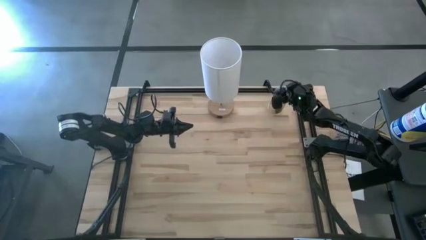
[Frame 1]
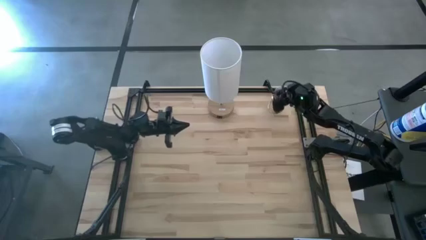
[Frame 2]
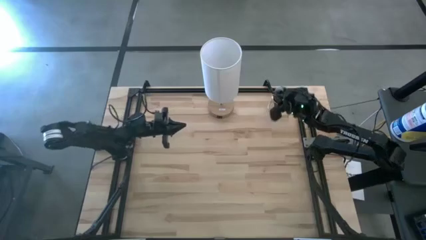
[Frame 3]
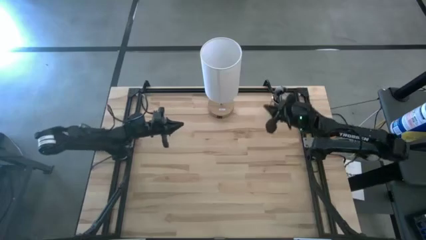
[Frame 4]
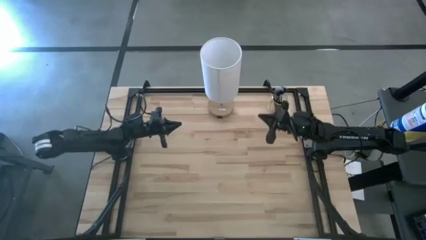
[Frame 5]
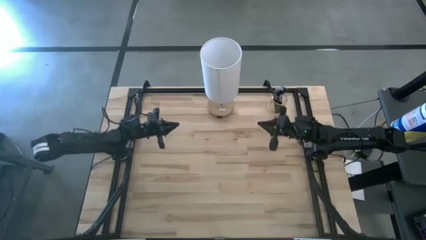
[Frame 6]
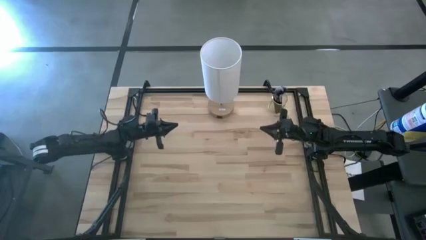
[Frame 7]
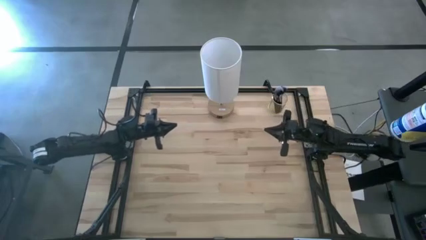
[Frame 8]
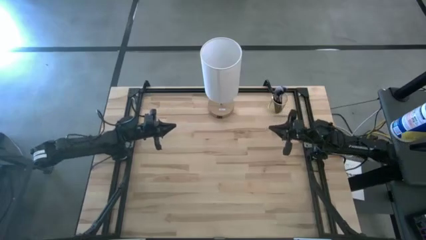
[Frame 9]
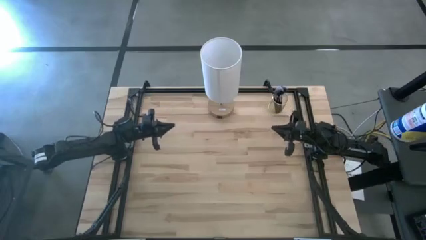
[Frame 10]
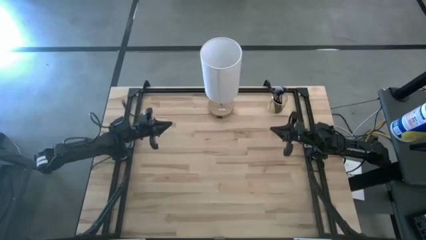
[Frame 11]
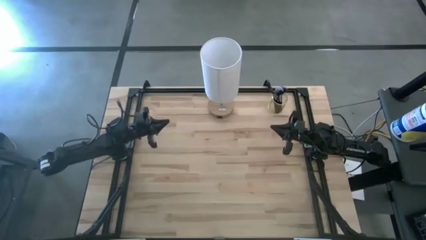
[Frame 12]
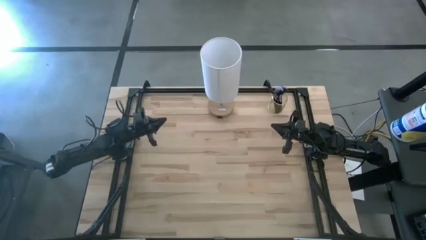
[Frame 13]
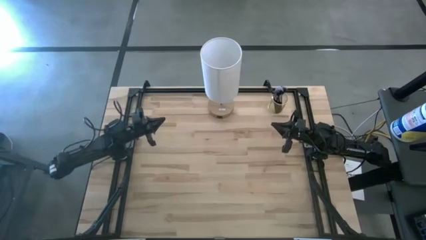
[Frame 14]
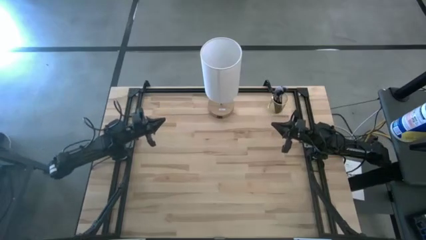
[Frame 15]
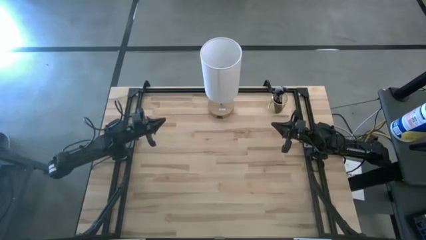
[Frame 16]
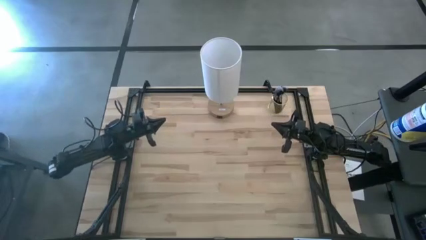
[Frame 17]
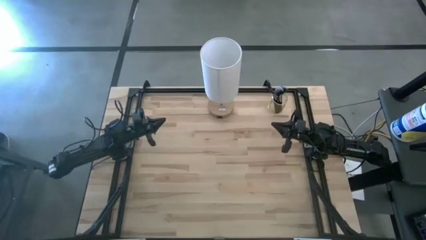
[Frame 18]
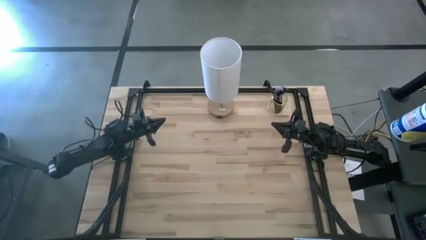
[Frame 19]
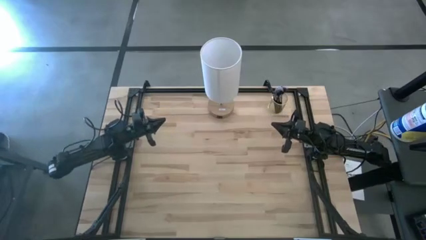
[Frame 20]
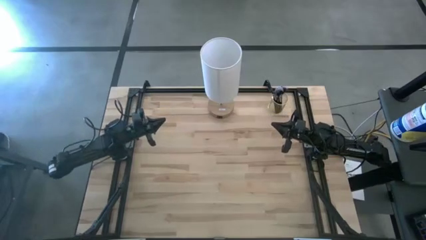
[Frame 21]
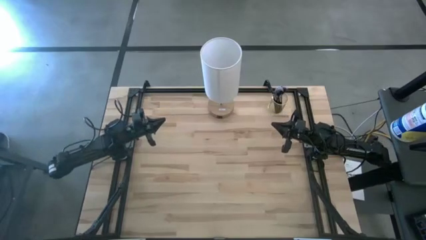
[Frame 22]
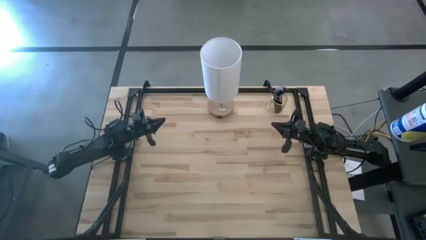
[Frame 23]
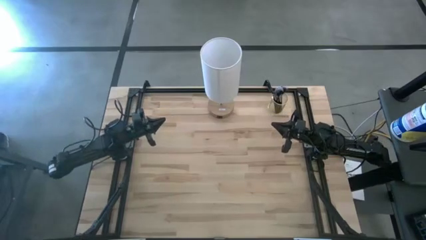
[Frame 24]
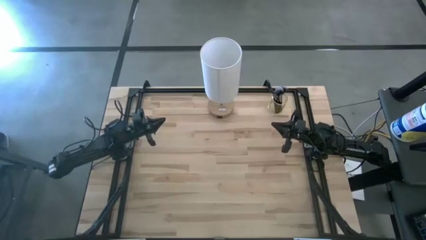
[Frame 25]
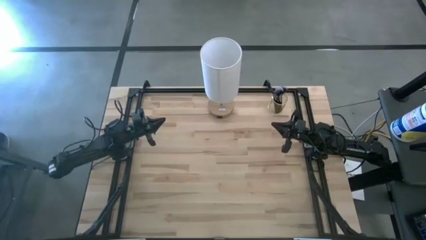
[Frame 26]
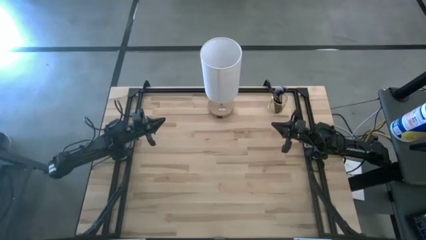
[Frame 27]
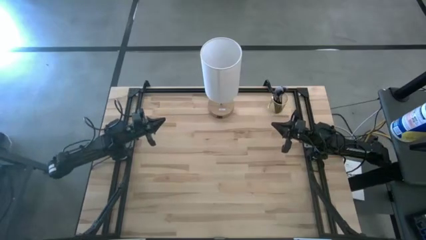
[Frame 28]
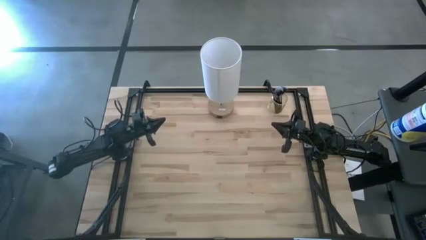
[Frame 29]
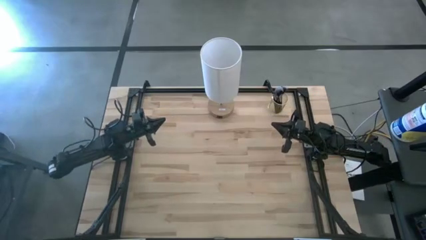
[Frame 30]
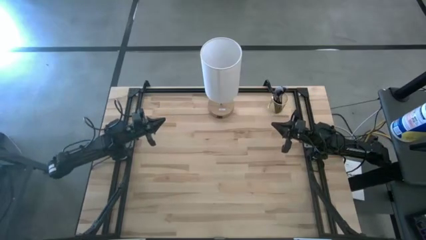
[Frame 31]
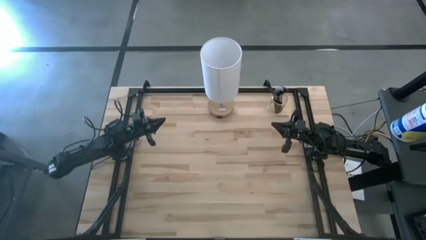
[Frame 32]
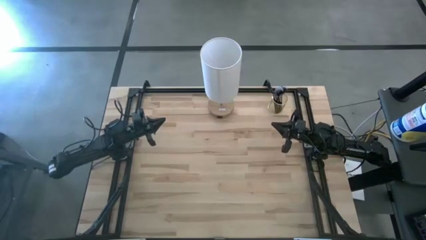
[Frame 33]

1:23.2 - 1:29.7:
Task: Pick & Place Makeup Brushes
Return to Home Position

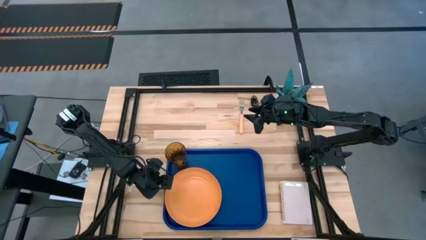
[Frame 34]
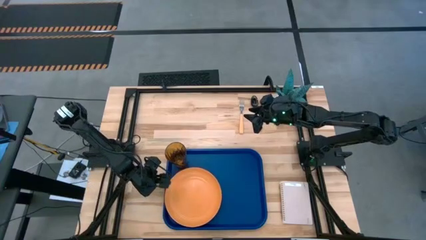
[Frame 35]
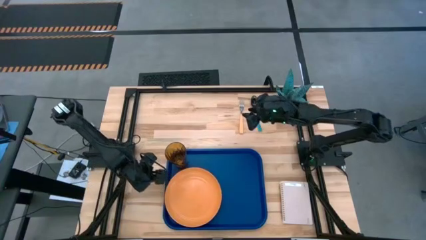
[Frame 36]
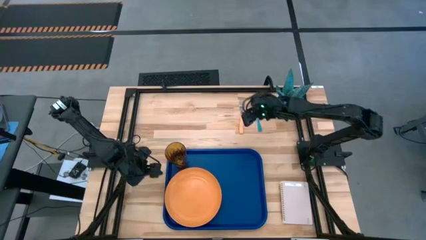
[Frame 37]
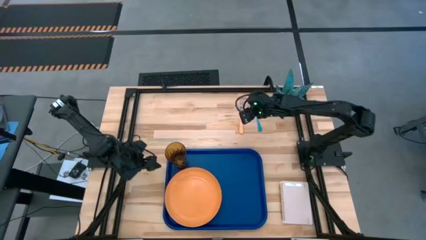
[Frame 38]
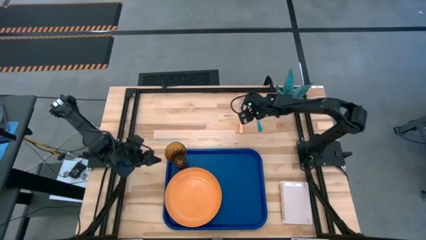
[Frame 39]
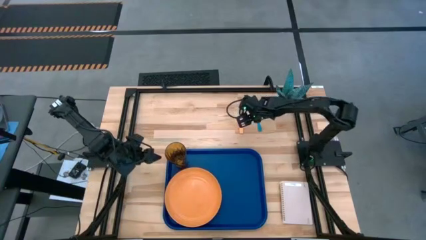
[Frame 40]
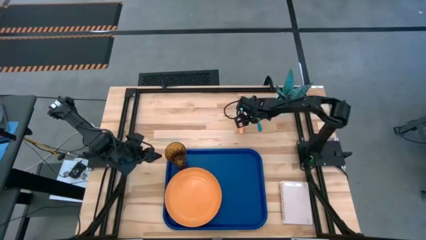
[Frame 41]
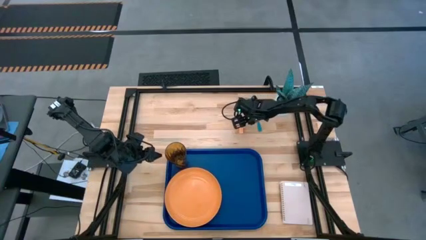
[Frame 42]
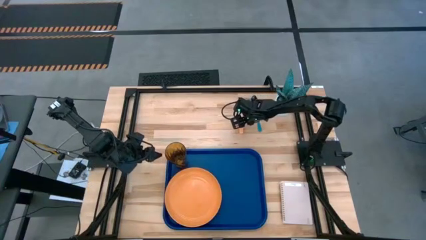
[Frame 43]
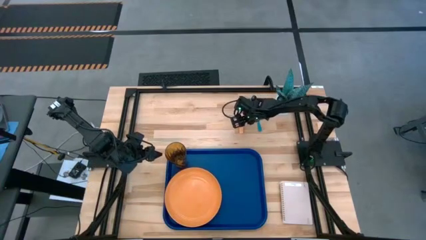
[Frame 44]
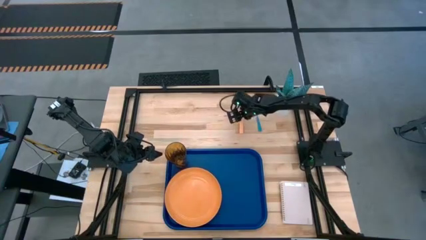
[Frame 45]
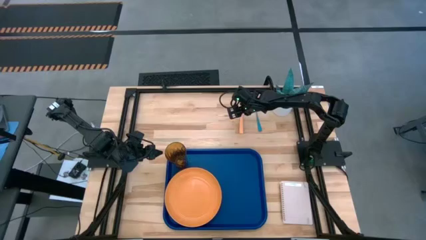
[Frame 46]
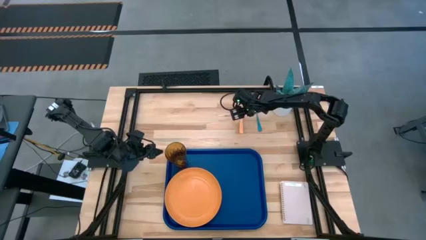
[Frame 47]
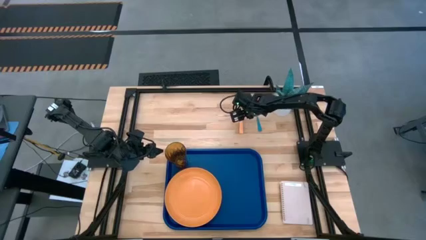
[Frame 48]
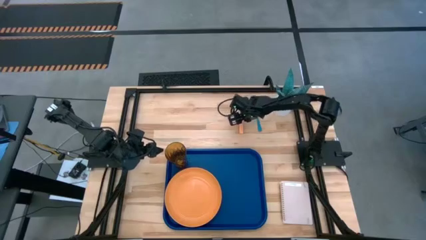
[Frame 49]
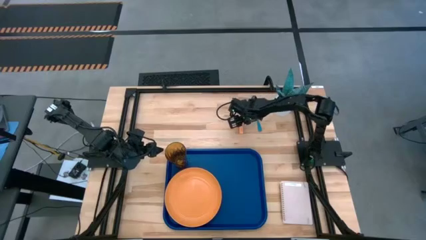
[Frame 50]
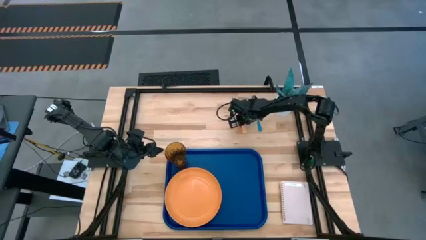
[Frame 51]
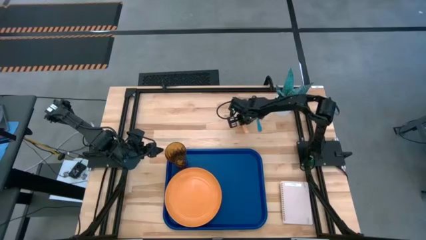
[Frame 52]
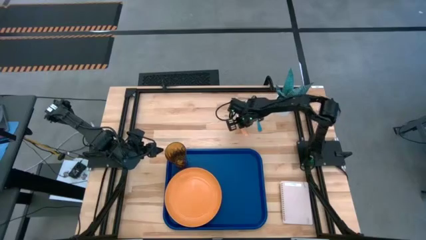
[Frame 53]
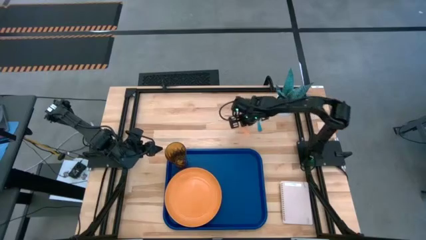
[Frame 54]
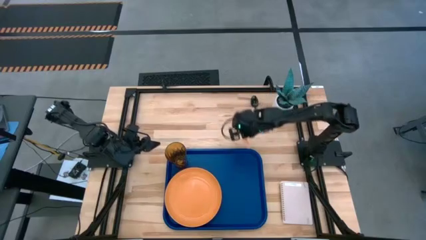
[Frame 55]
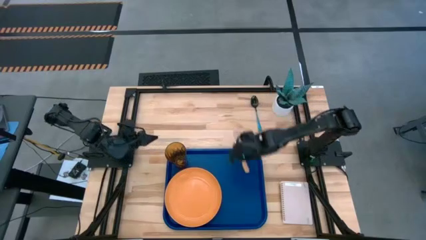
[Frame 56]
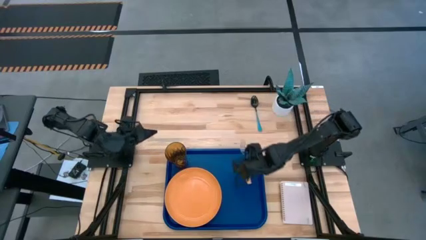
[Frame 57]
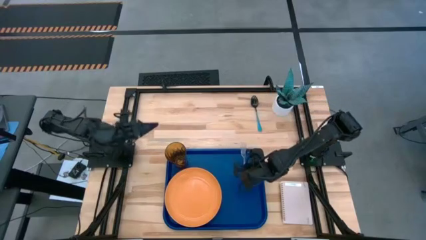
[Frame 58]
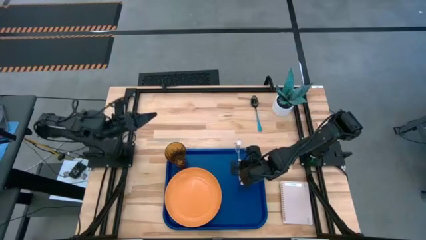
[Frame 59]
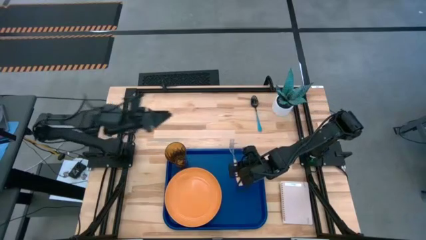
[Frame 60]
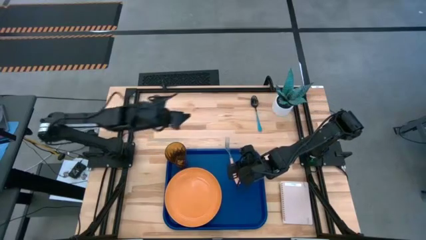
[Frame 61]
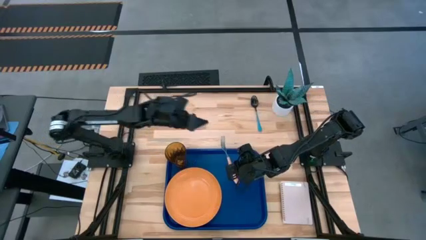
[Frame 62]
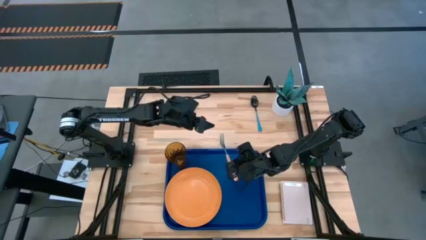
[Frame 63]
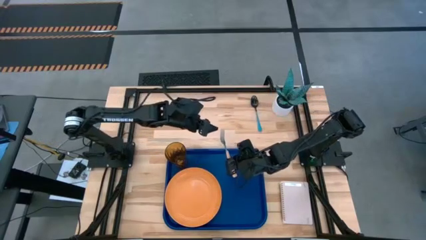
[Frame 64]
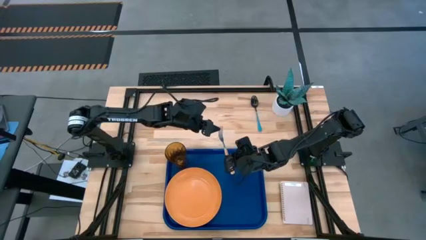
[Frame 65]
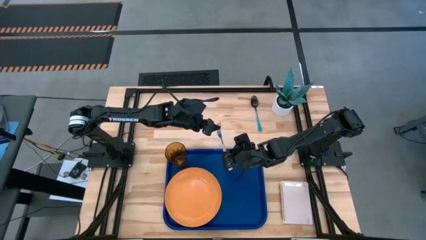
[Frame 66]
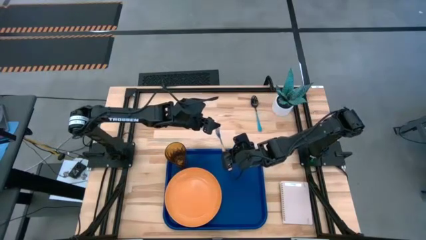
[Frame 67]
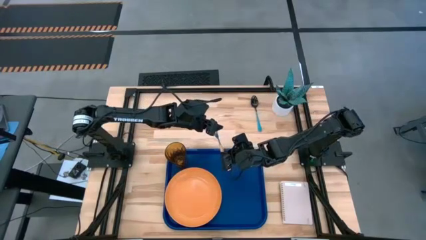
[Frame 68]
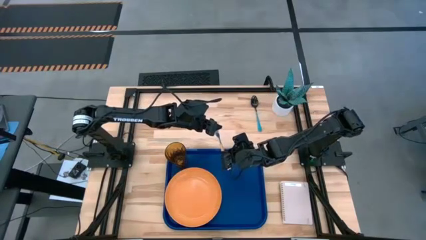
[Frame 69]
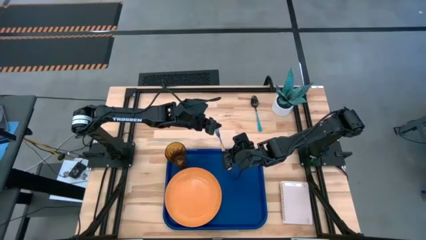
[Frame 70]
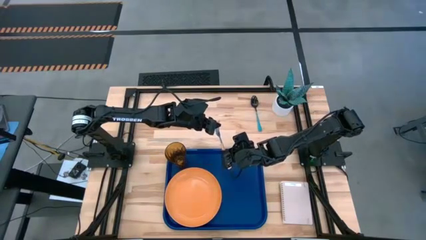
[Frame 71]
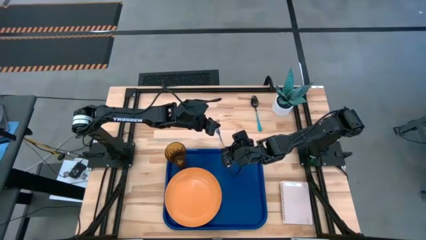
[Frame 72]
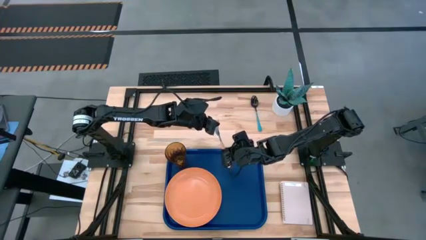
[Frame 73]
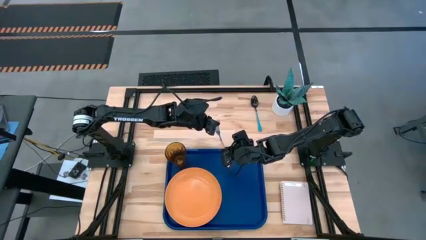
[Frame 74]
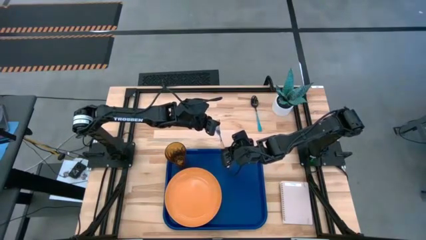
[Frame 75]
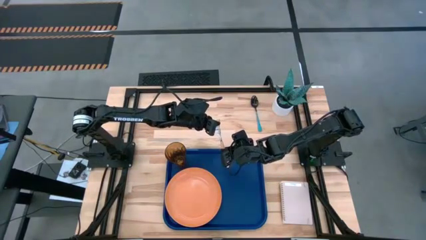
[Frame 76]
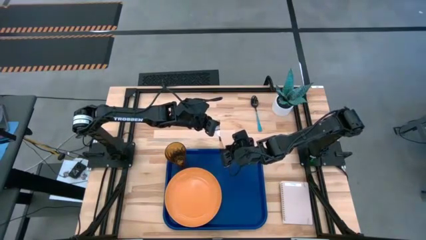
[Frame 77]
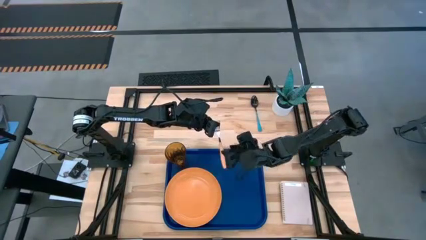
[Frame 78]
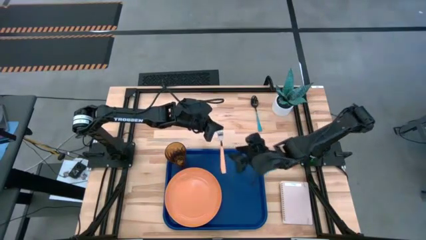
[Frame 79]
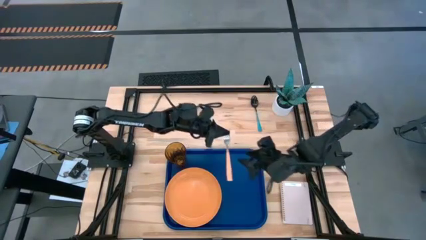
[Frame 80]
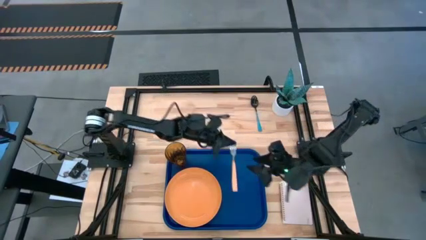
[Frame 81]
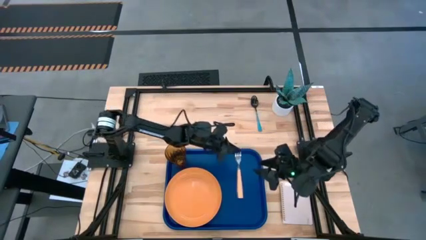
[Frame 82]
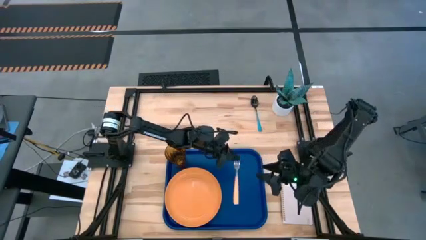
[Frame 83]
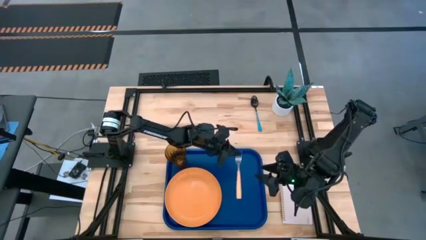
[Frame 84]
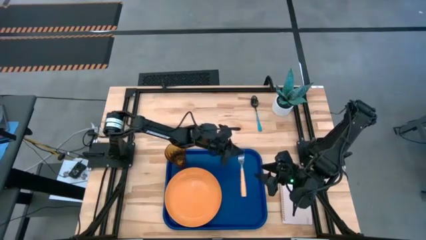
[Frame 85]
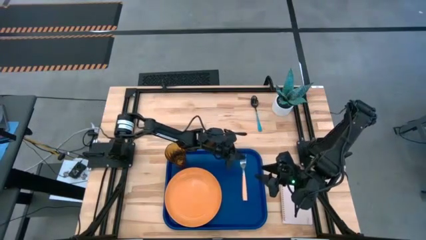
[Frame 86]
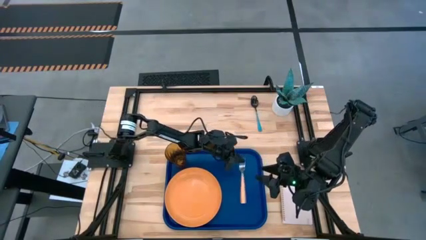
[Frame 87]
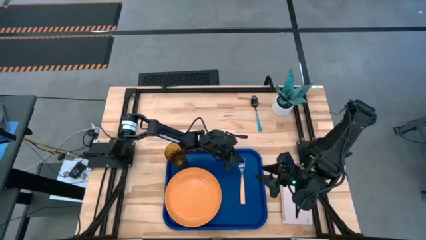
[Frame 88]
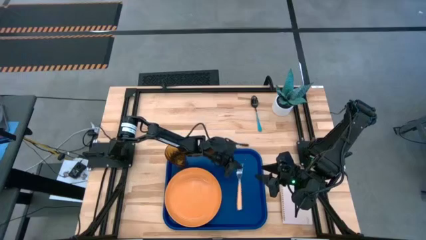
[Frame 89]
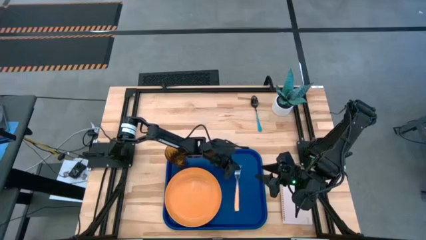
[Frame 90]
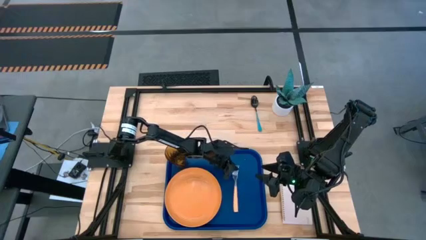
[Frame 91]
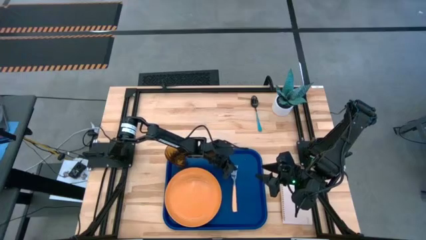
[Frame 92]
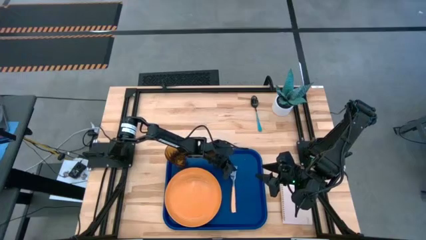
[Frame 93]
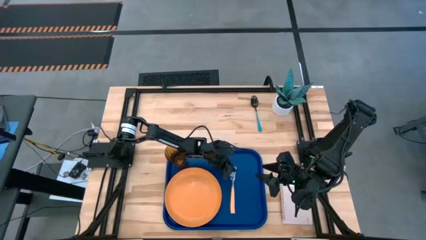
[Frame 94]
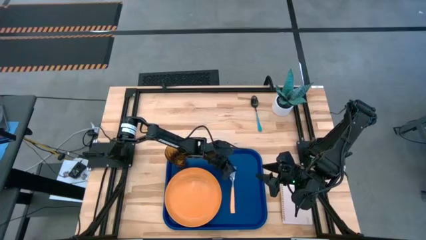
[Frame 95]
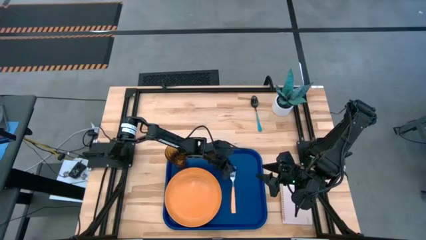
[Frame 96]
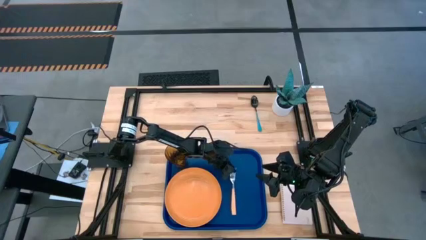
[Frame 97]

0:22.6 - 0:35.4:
Task: Pick and place plate/cup/fork/spoon on tray
Put the brown fork on the blue serving tray to the right of the orange plate
